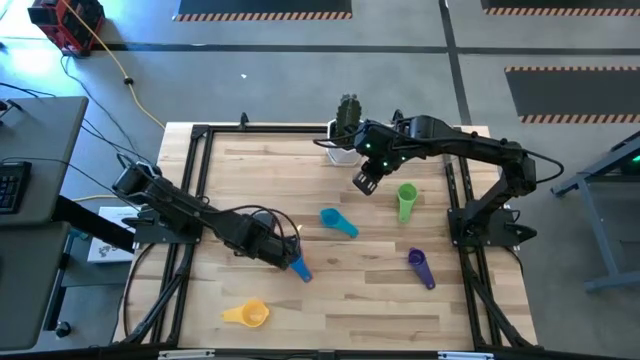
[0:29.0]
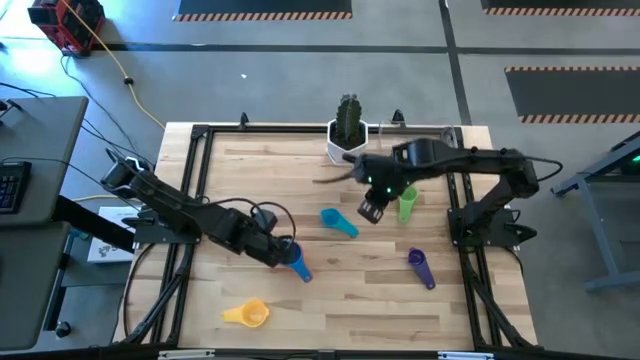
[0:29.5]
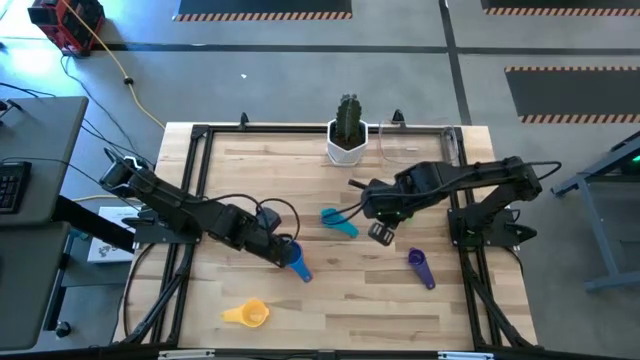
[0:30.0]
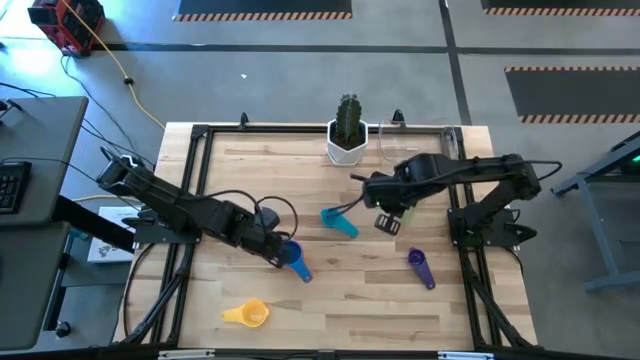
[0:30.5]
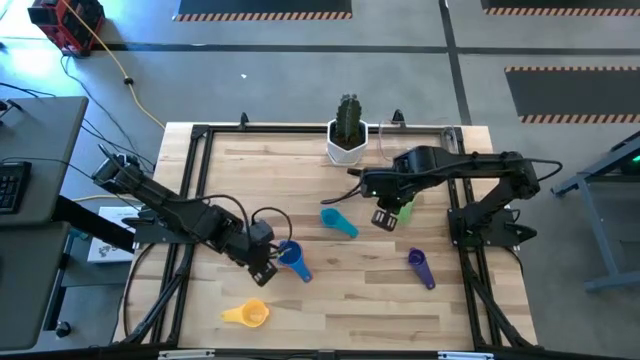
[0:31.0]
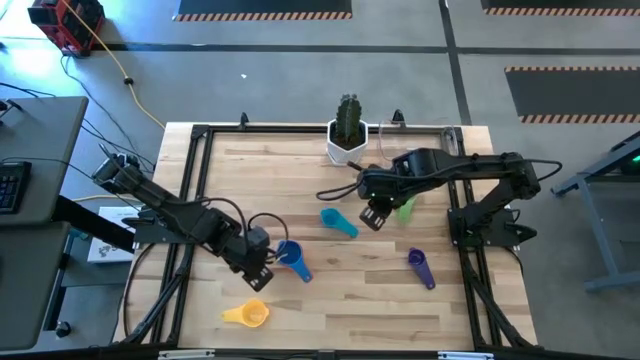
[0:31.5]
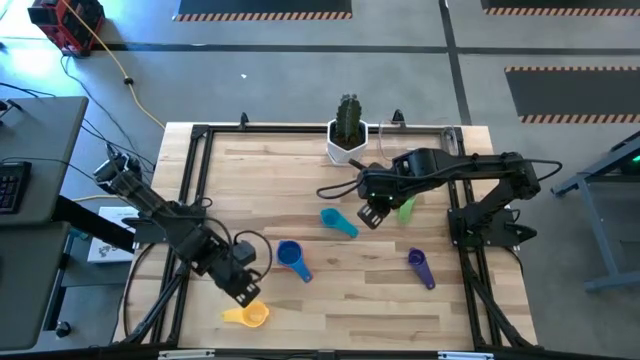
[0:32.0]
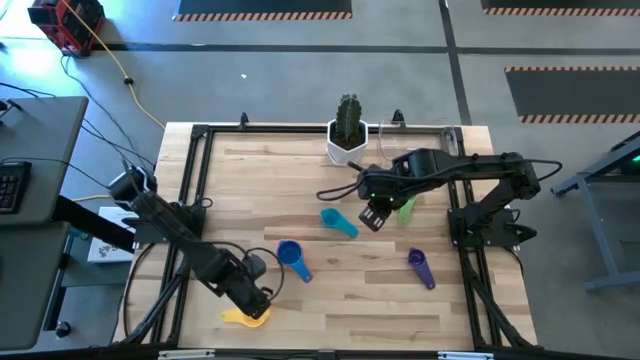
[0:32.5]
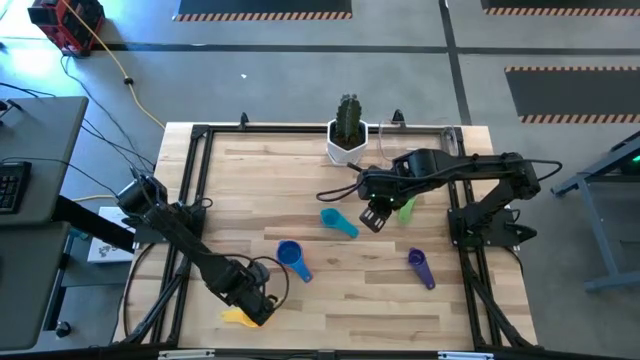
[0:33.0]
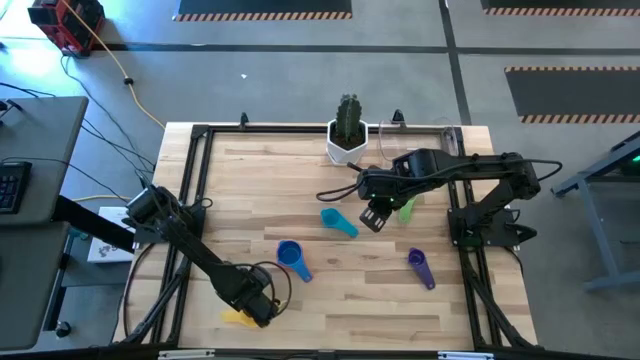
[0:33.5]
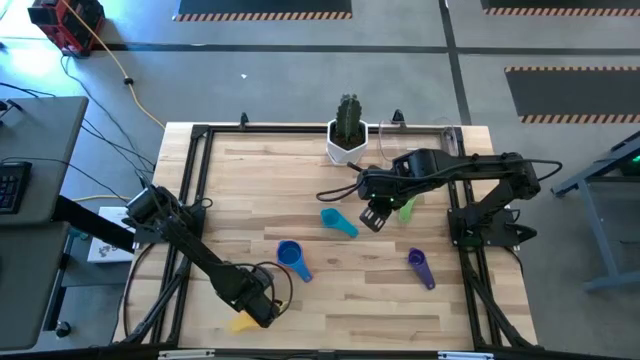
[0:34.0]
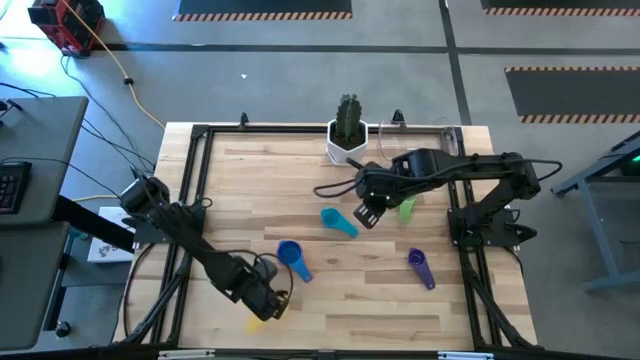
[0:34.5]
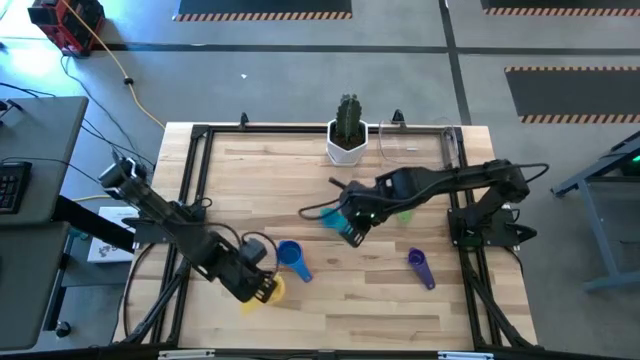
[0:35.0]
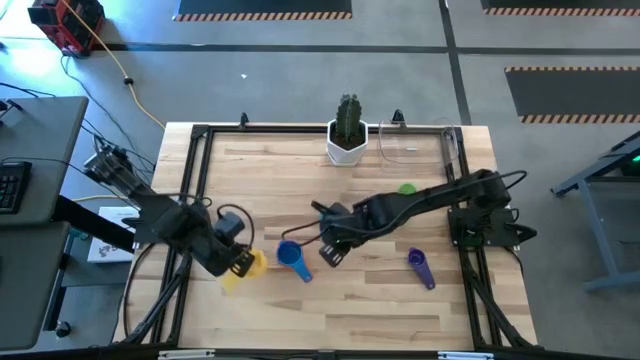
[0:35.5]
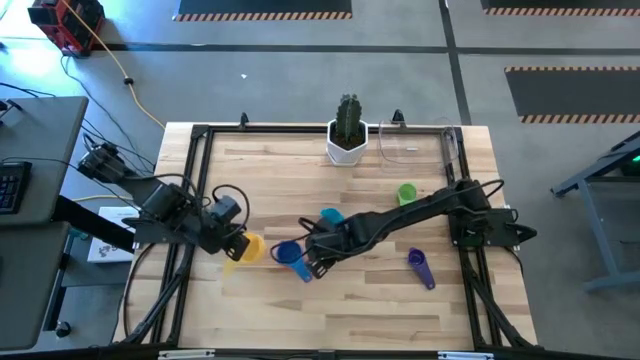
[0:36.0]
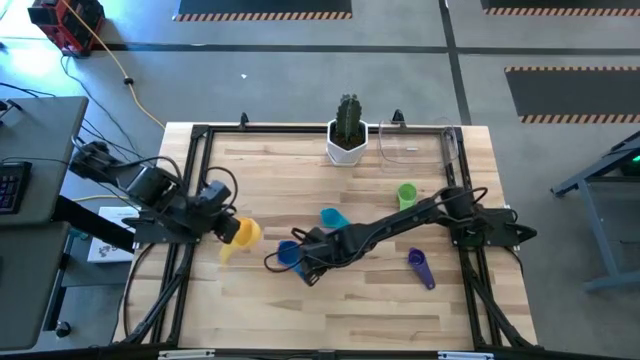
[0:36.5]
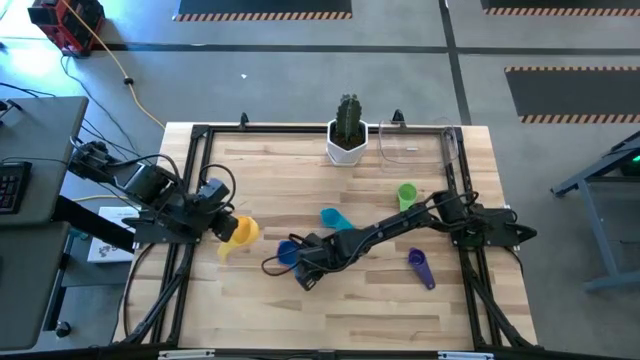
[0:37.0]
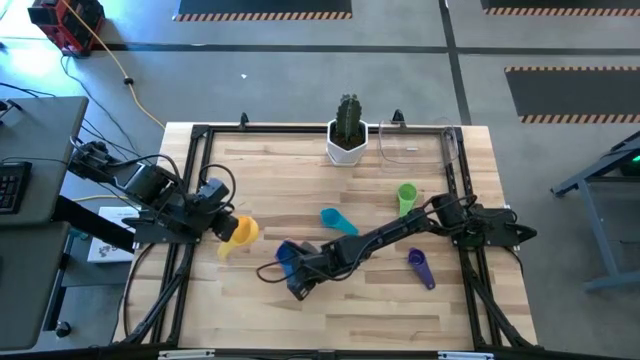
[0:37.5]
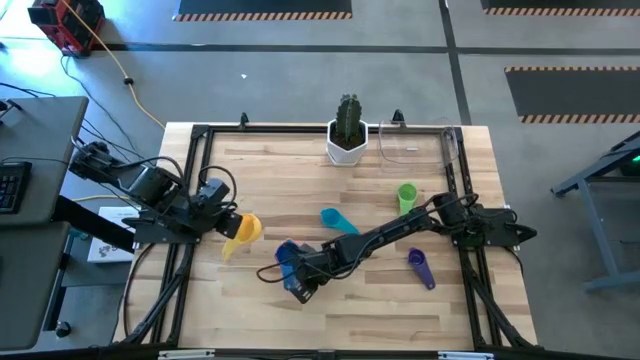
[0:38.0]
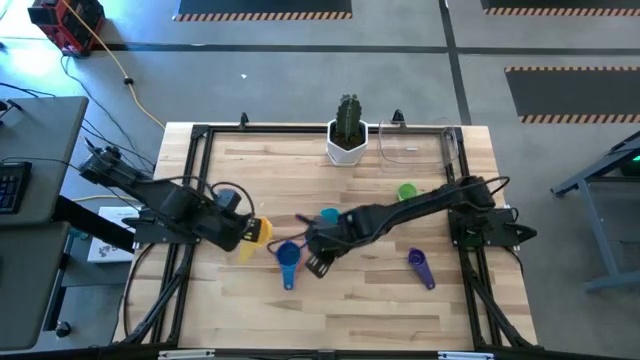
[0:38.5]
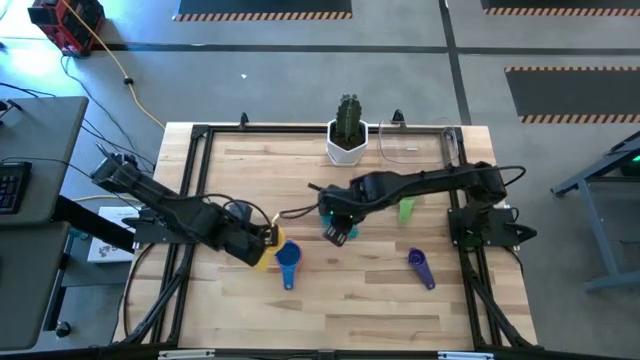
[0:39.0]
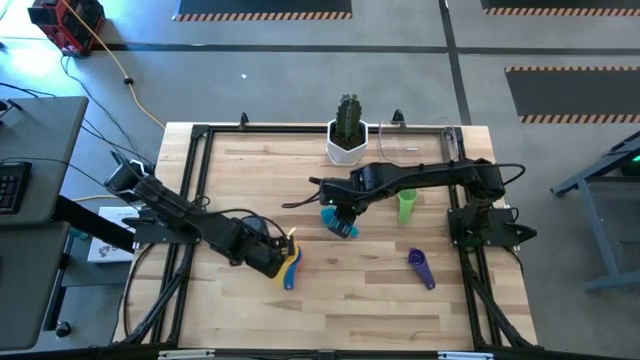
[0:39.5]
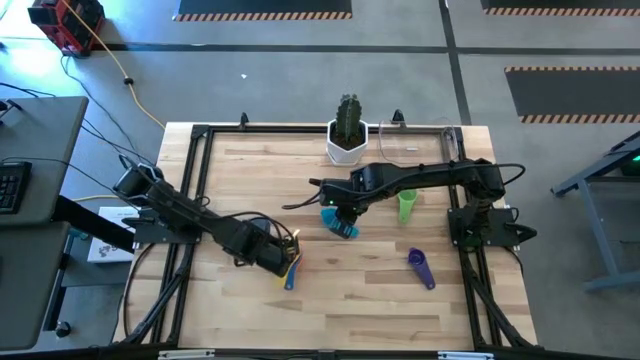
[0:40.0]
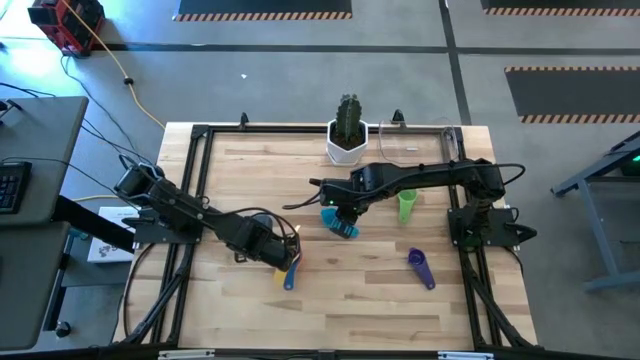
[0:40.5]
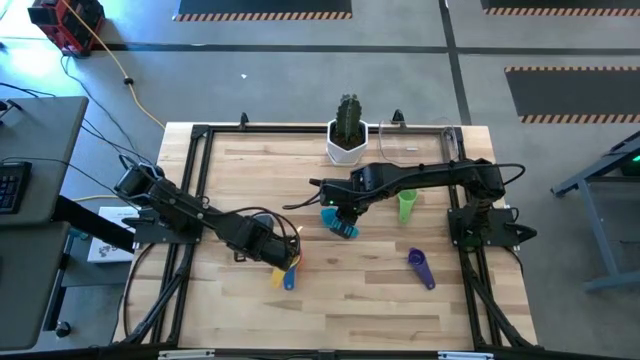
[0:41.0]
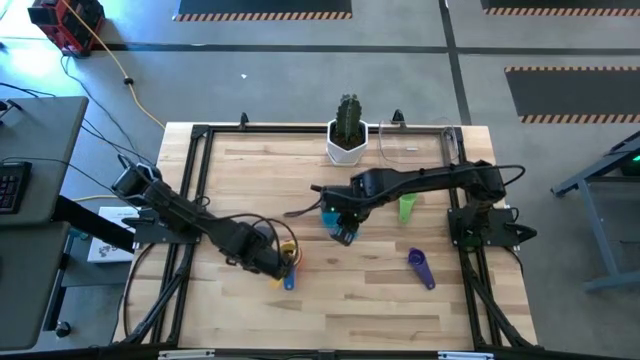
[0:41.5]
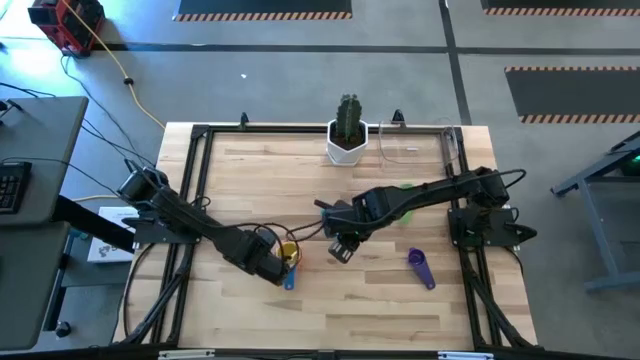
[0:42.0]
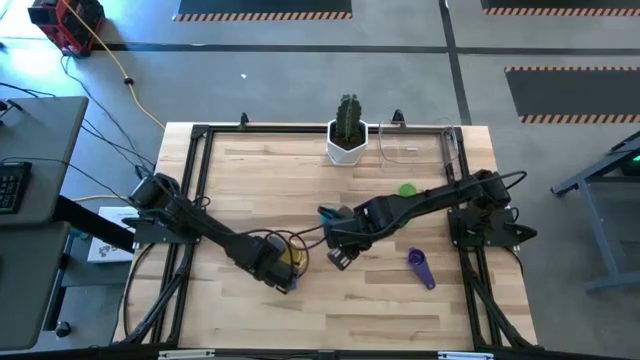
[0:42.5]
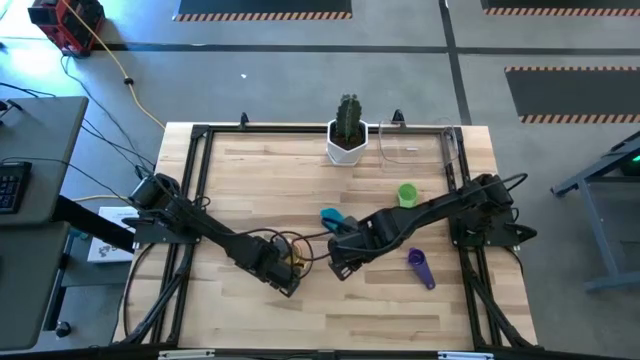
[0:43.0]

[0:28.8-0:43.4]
Task: Nest measuring cups in basket
Put the yellow measuring cup on top of the blue measuring cup

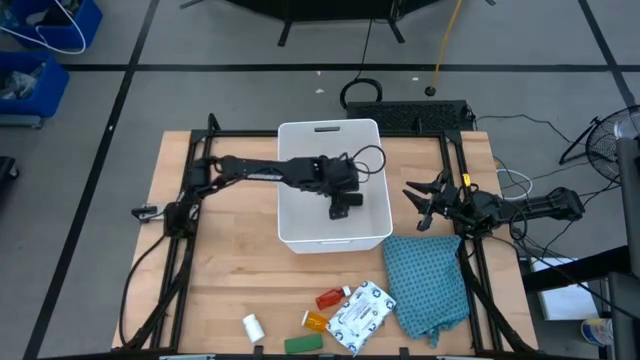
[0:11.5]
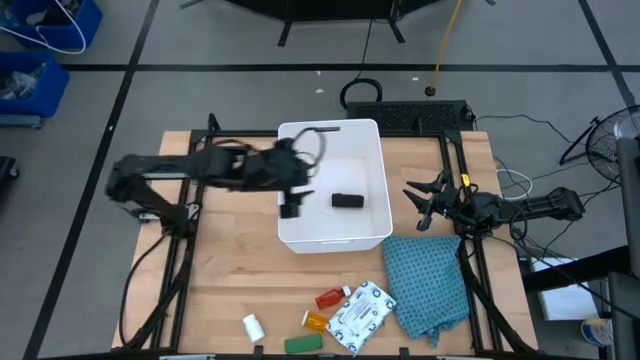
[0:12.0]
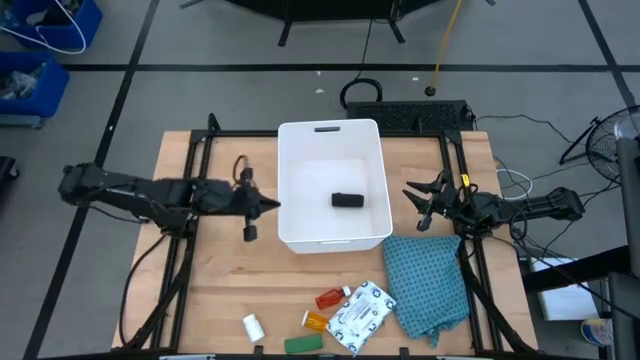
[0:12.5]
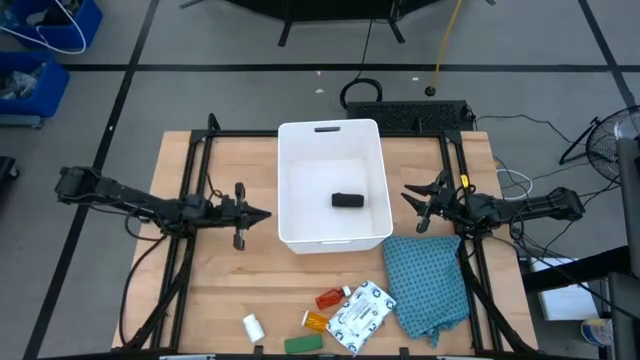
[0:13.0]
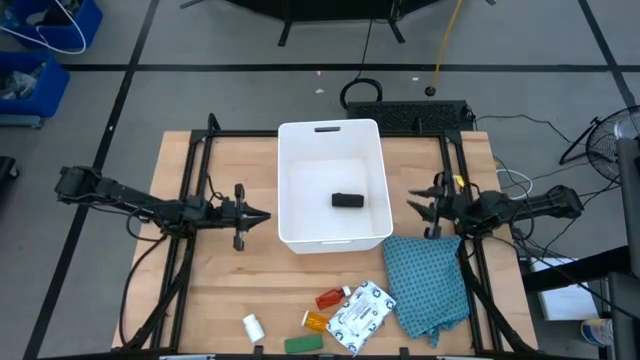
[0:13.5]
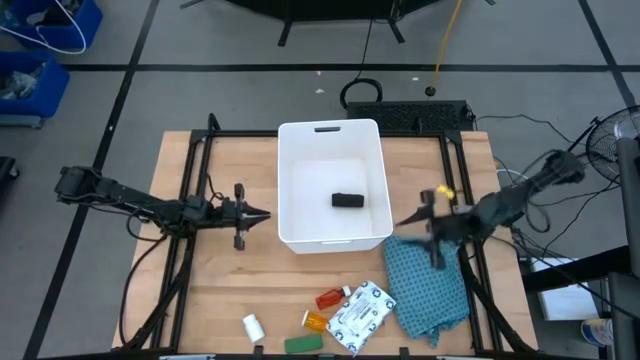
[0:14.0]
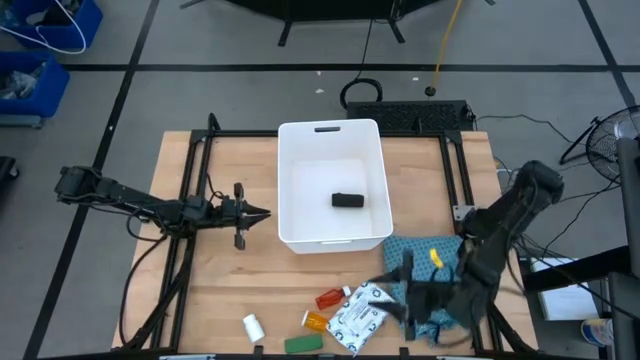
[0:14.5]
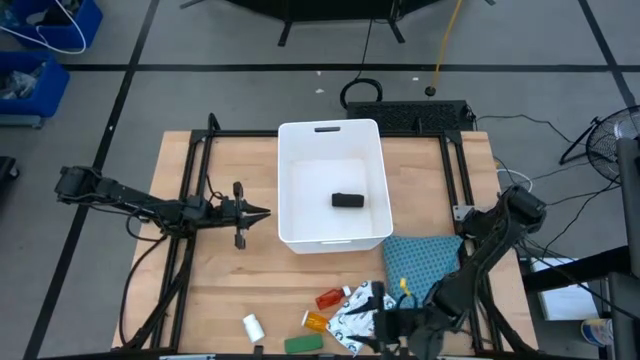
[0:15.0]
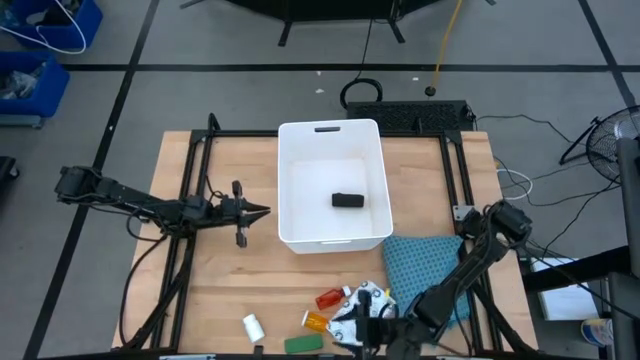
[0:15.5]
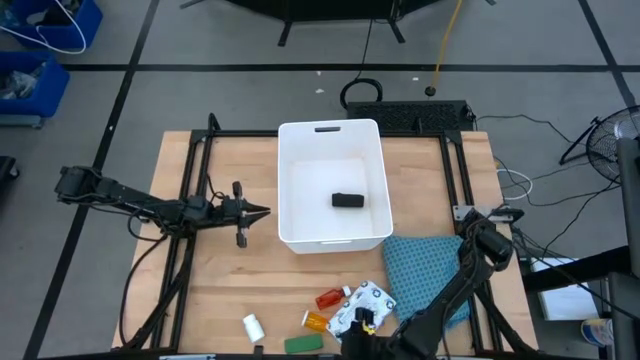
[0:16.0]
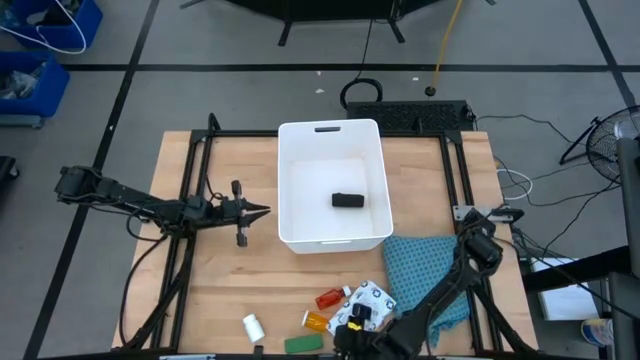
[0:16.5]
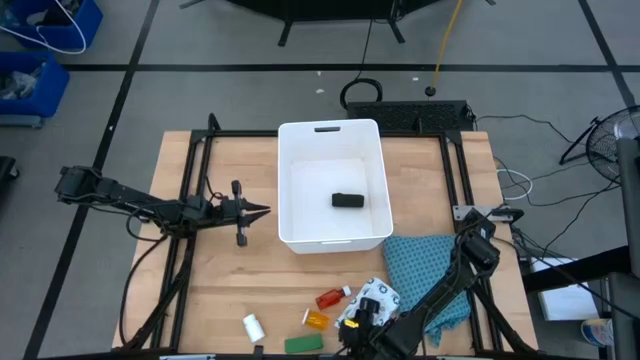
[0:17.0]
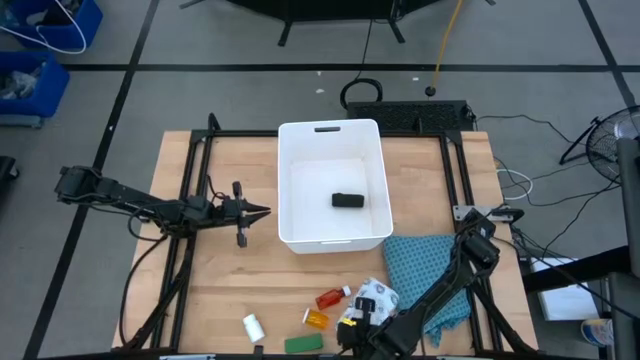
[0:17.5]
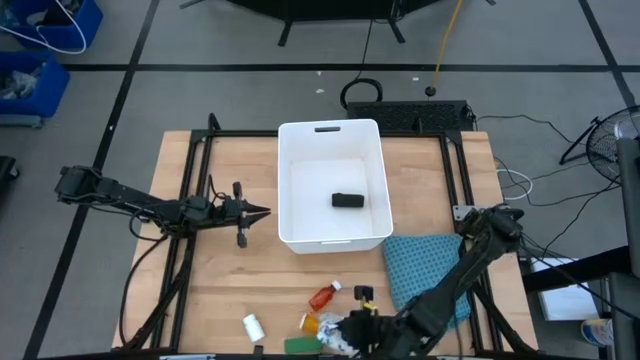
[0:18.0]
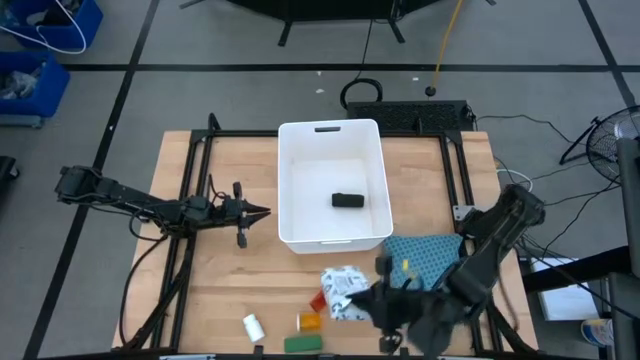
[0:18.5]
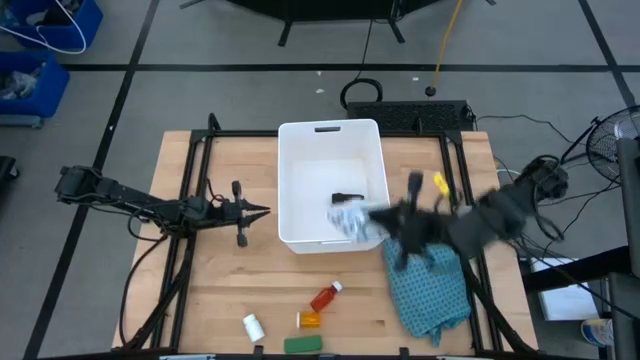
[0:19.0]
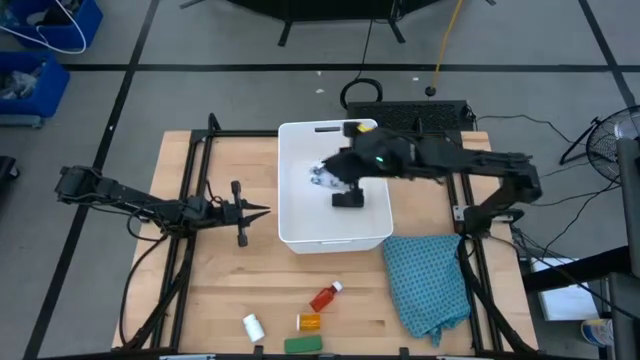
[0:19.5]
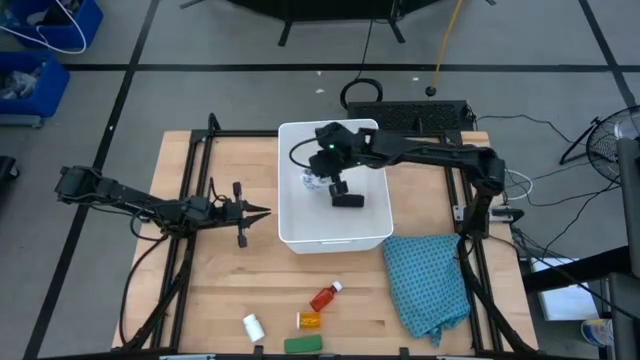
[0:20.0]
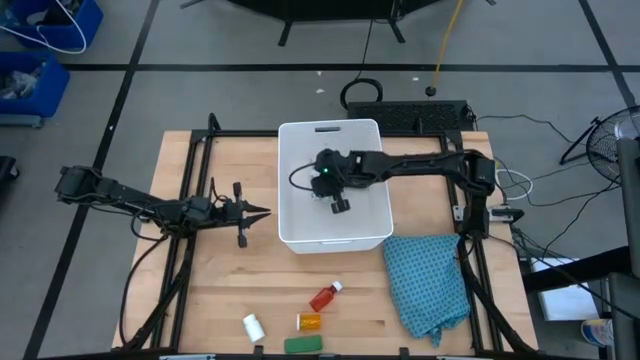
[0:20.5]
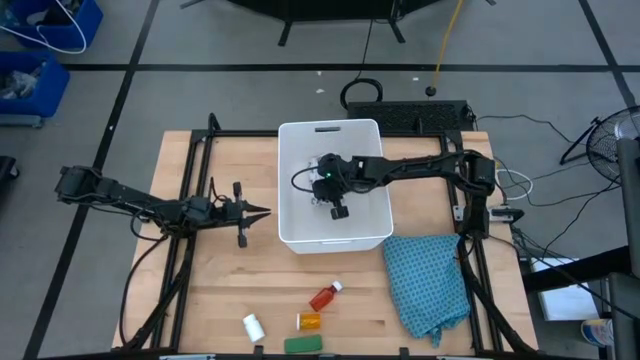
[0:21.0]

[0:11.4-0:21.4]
Task: Pick & place medical supplies in basket/bin
Put the mailer bag into the white bin
